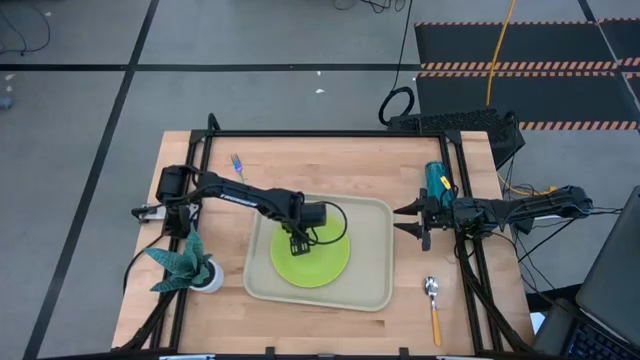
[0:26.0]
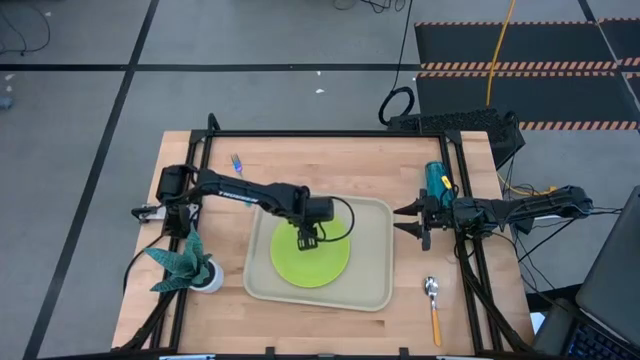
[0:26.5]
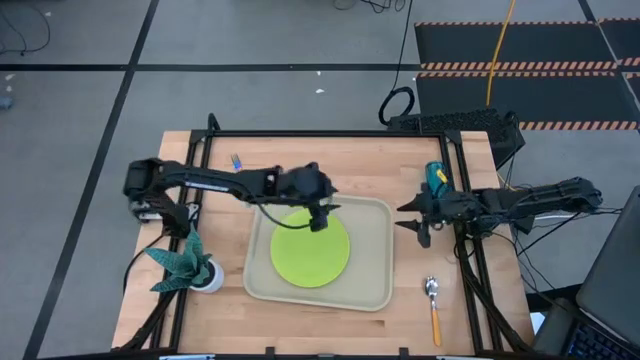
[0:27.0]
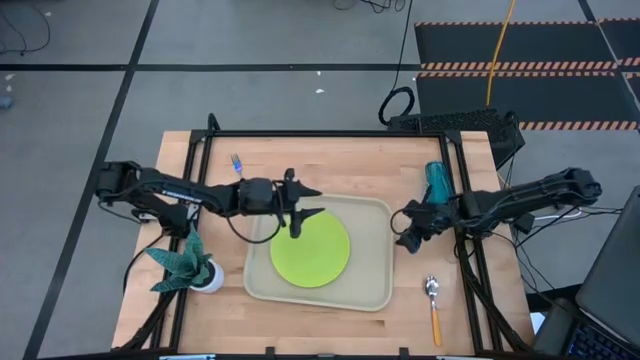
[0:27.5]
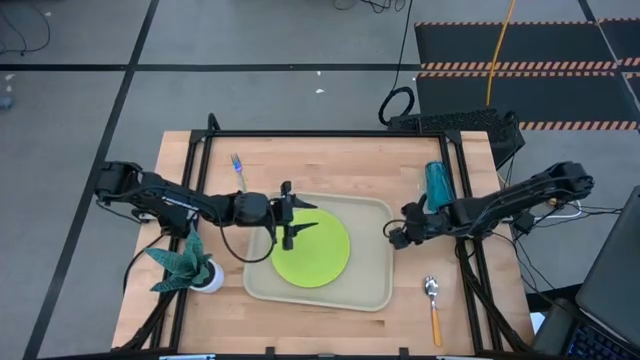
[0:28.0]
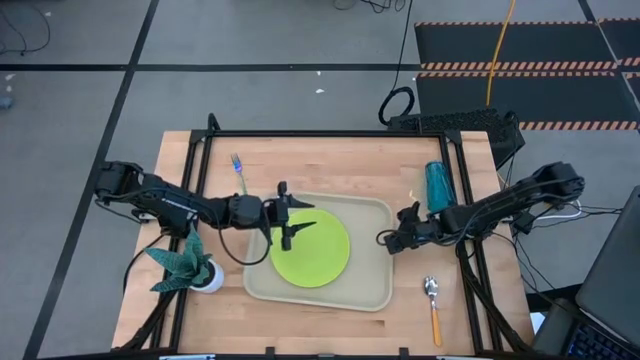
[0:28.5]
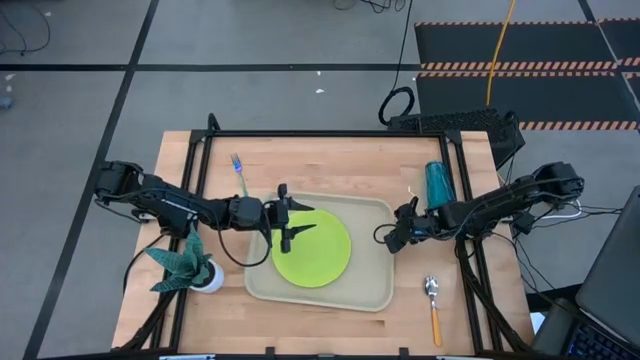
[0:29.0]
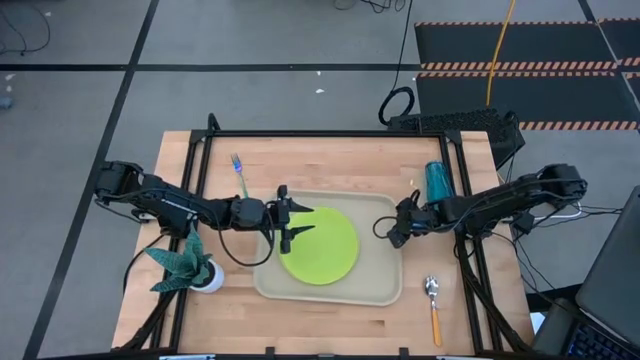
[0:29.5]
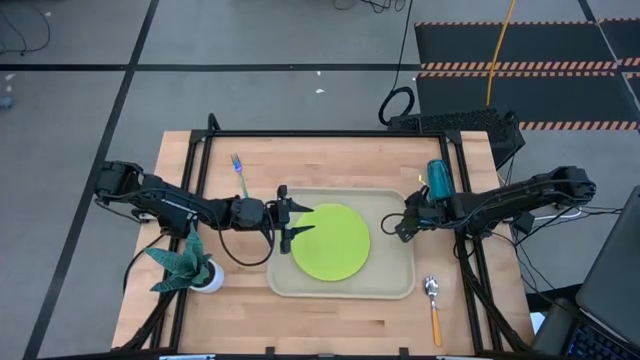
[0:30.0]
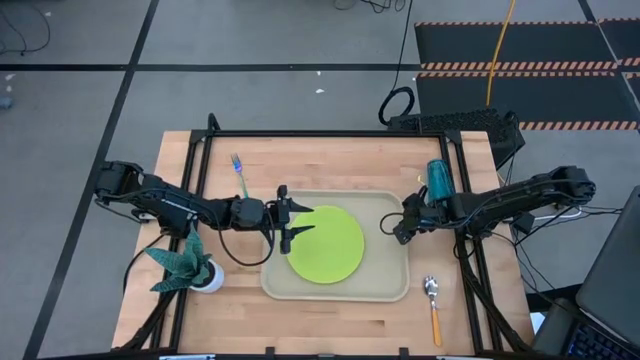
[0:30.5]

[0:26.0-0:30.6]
Task: Pick and place plate/cup/fork/spoon on tray
Adjust the gray serving tray

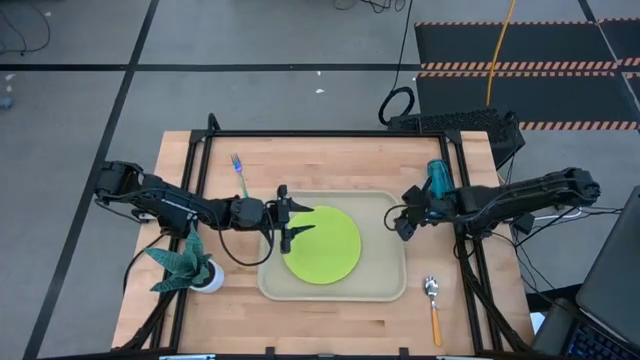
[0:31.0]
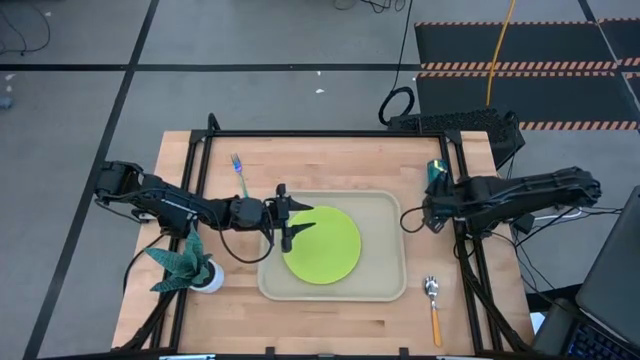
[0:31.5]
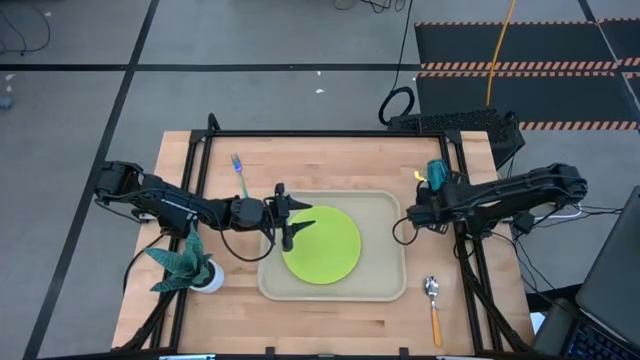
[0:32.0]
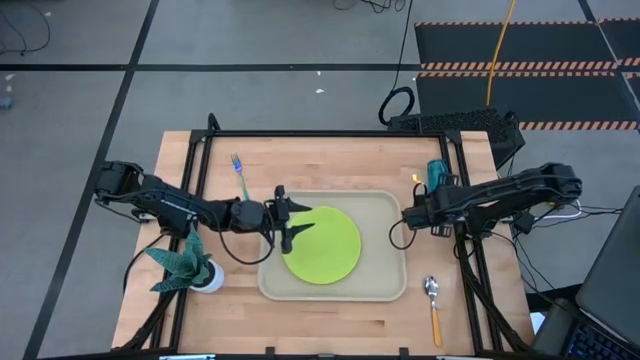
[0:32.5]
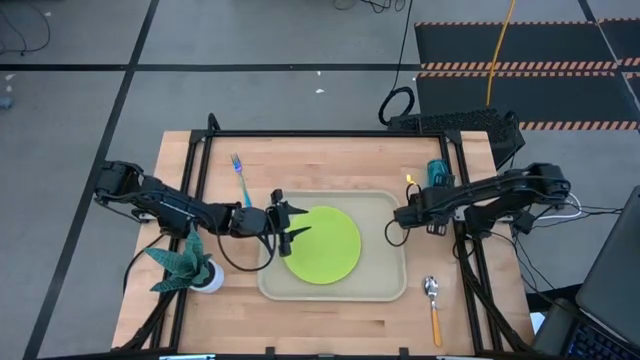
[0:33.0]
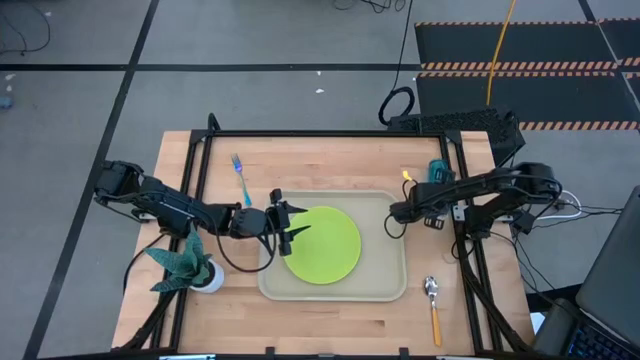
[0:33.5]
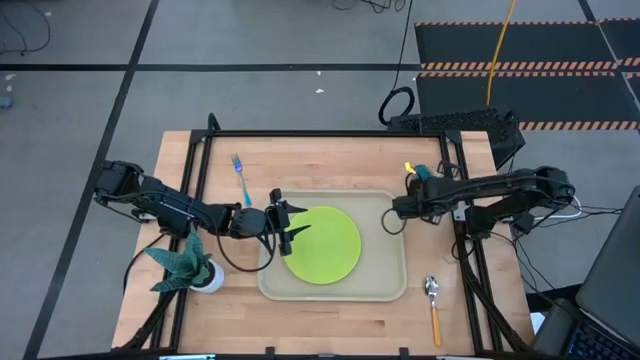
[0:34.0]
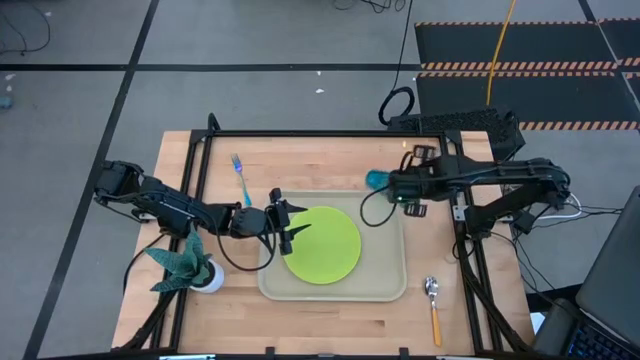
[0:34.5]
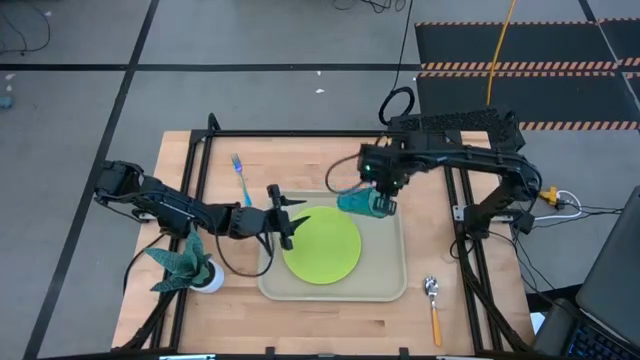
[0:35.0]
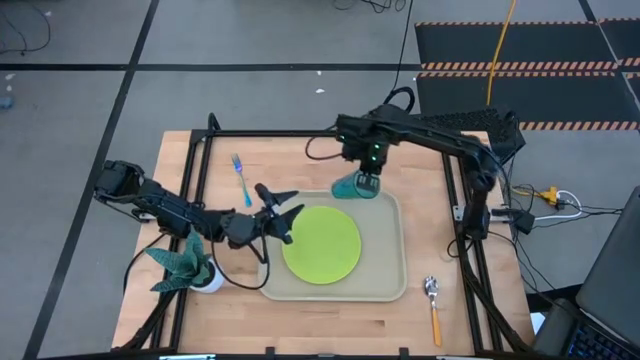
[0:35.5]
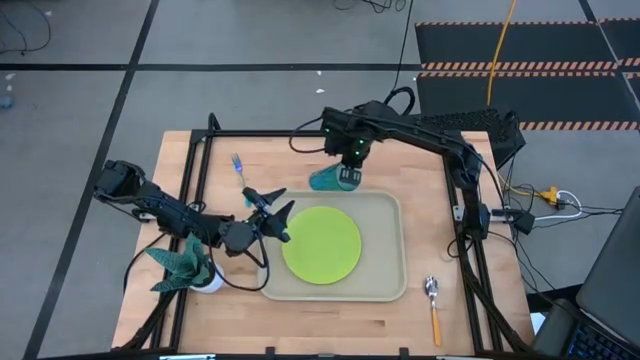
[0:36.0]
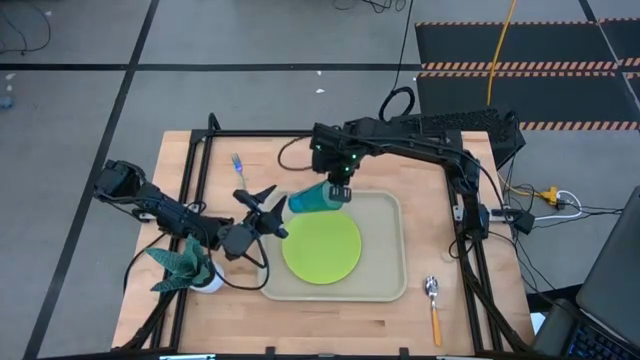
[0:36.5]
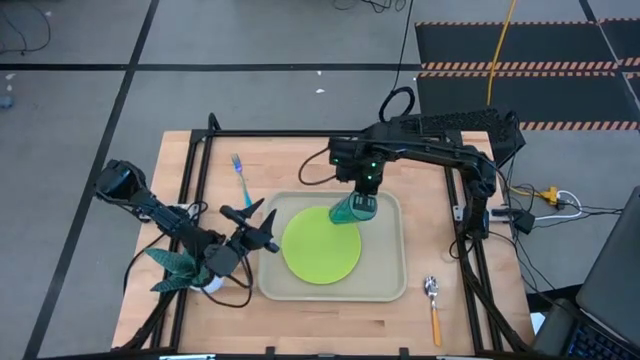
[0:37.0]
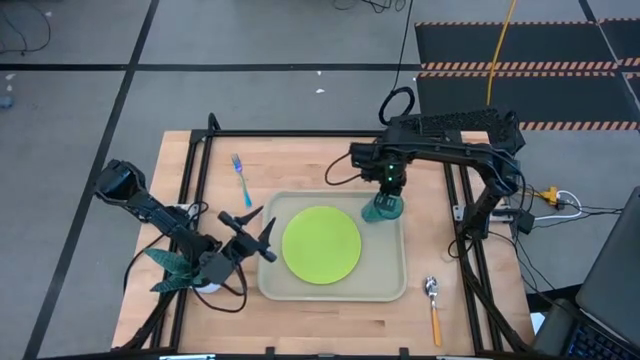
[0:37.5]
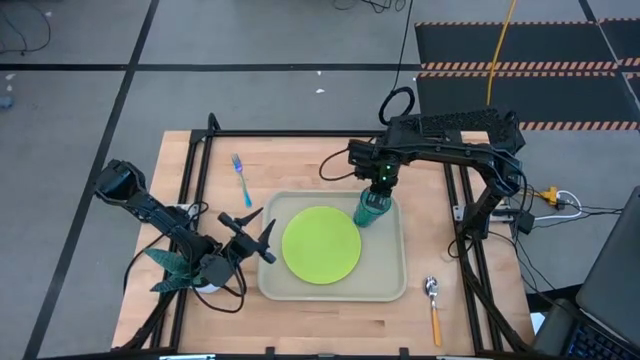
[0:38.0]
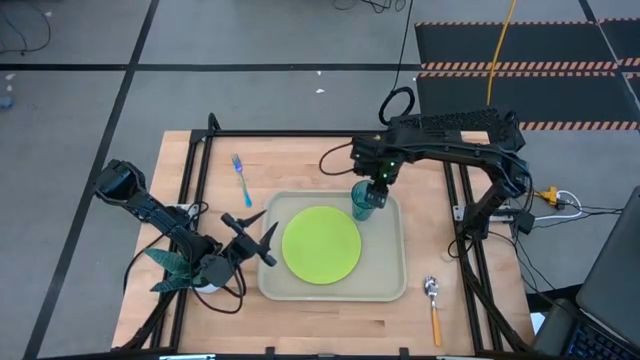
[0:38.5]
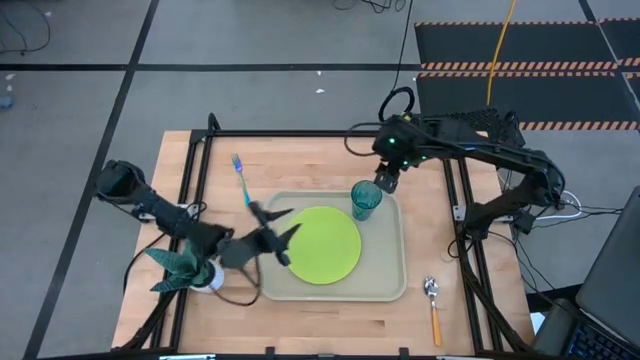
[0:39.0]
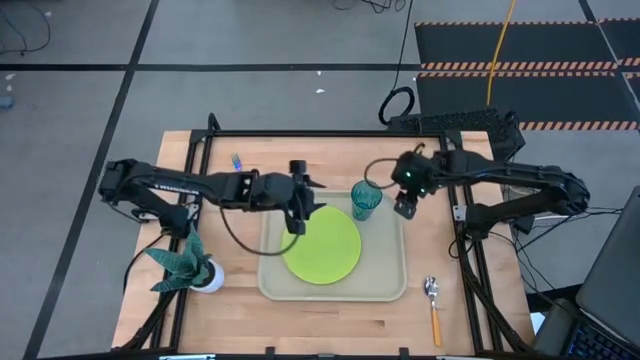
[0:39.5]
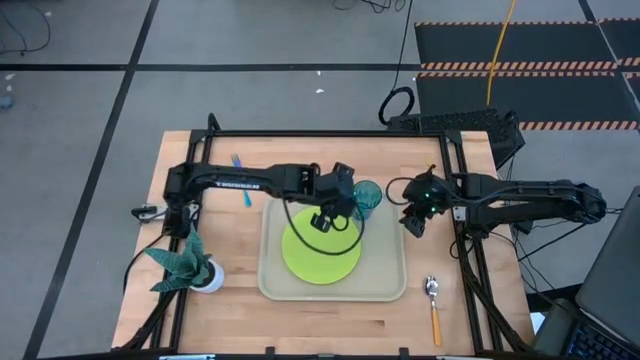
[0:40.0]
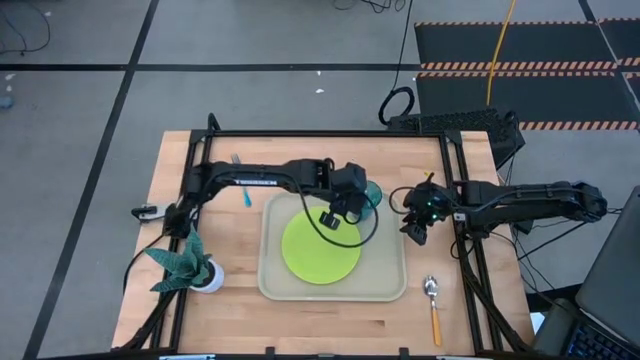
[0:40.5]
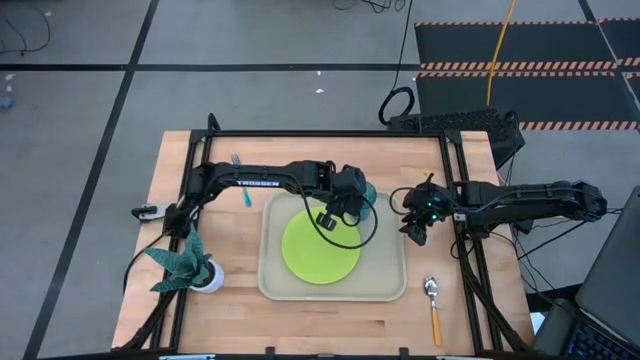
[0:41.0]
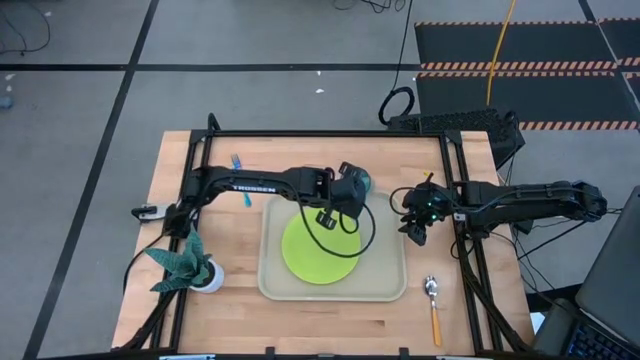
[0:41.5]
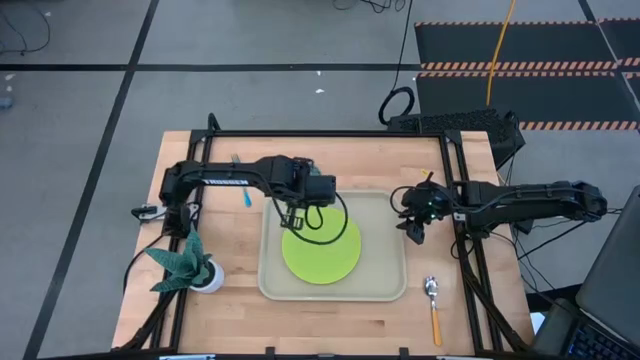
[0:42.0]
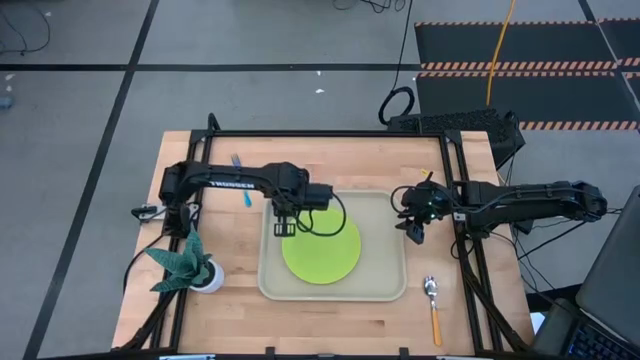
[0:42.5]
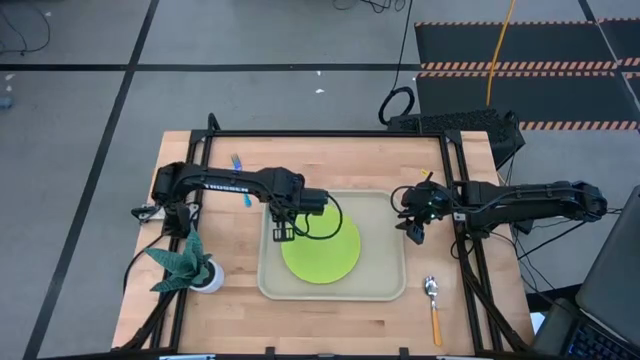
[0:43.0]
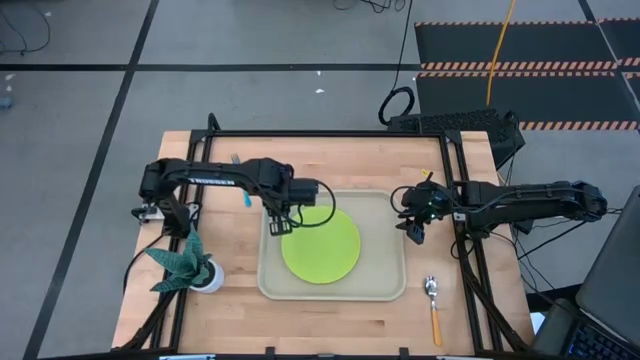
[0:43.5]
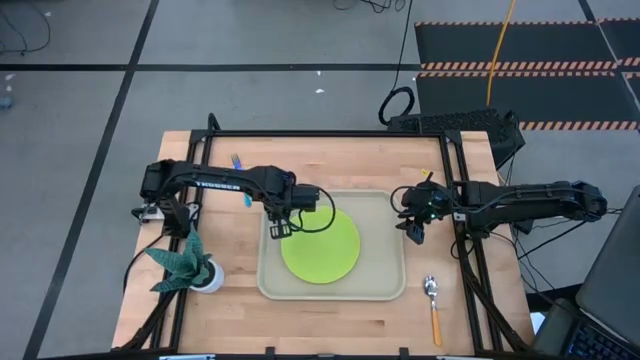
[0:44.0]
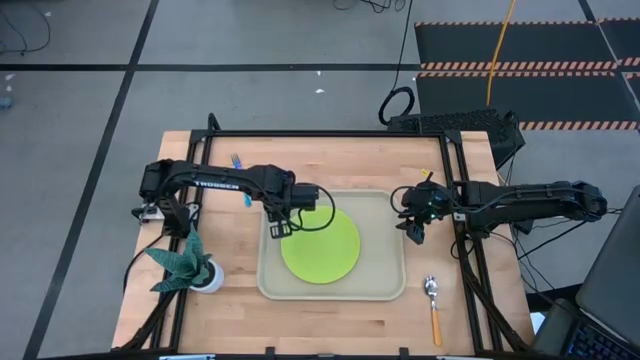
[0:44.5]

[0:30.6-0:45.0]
Put the blue cup on the gray serving tray

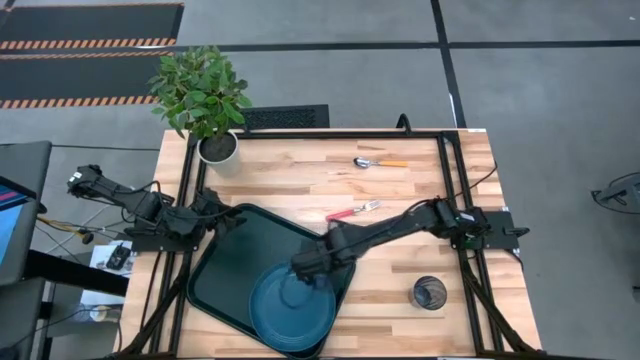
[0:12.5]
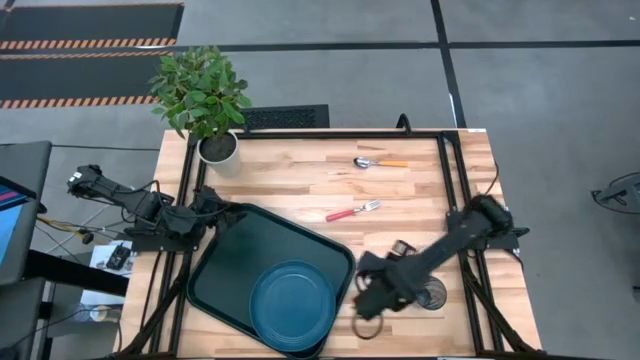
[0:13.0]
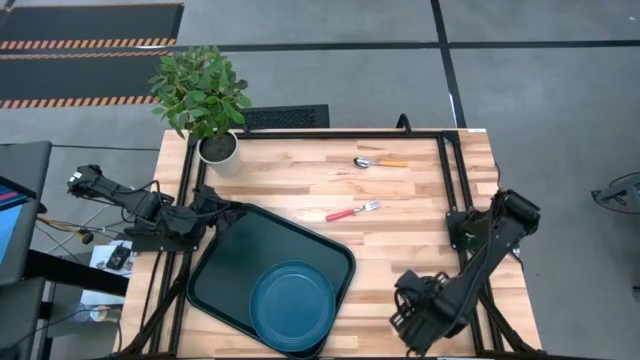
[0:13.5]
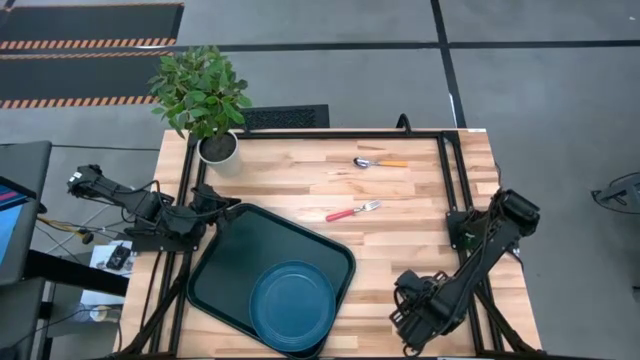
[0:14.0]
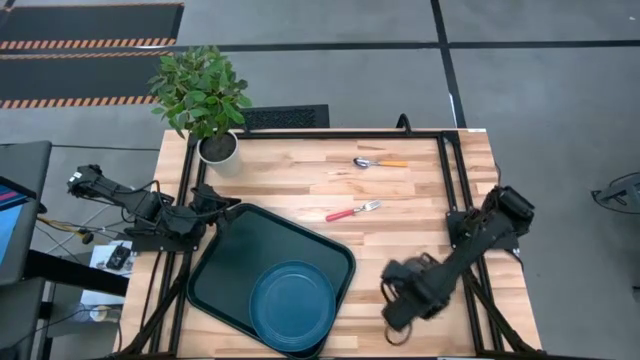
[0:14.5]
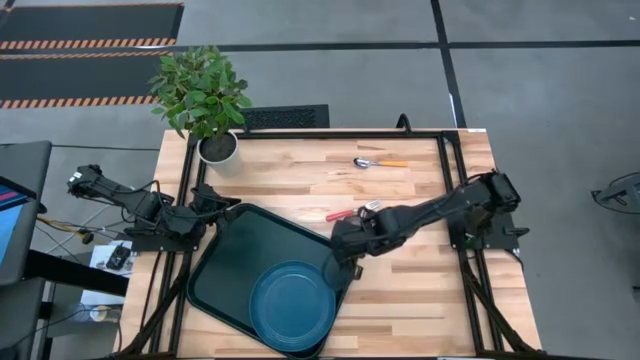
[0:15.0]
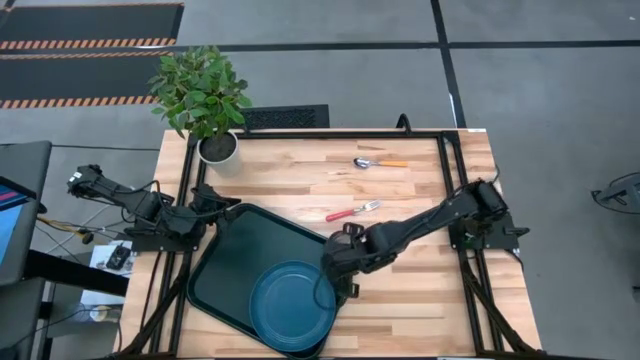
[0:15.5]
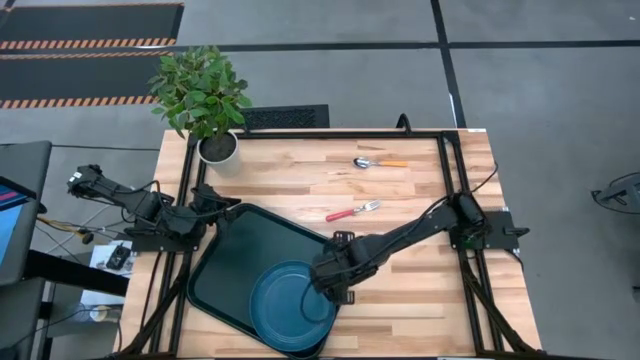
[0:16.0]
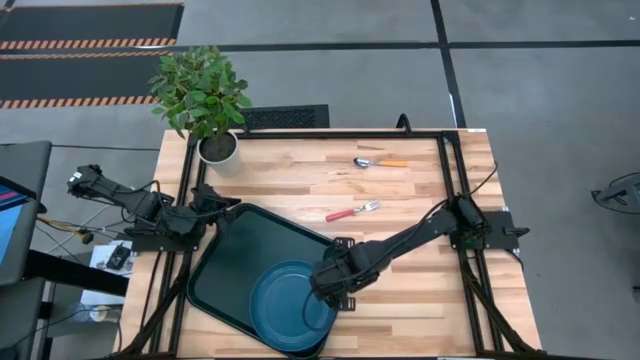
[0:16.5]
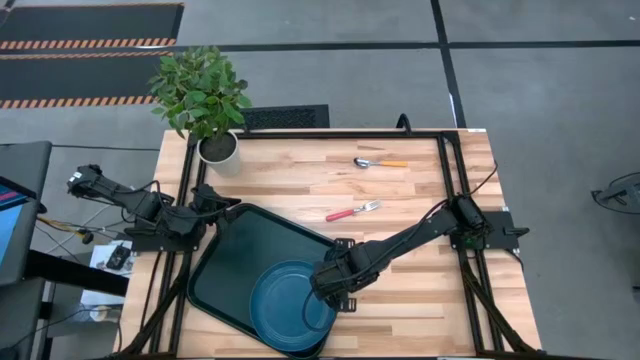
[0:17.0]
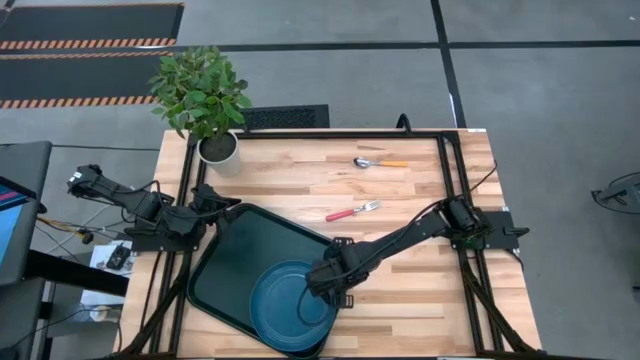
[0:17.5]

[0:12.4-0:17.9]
Task: Pick and place plate/cup/fork/spoon on tray
Put the dark blue glass on the black serving tray to the top right of the dark blue plate
